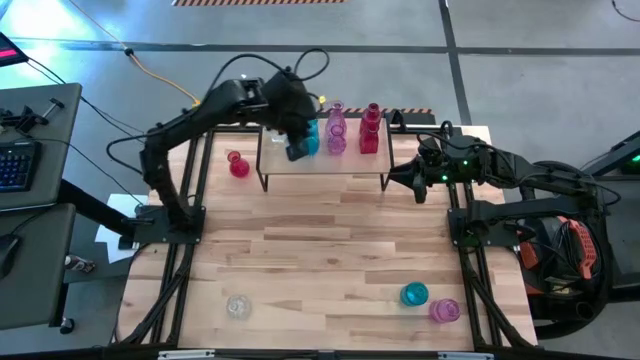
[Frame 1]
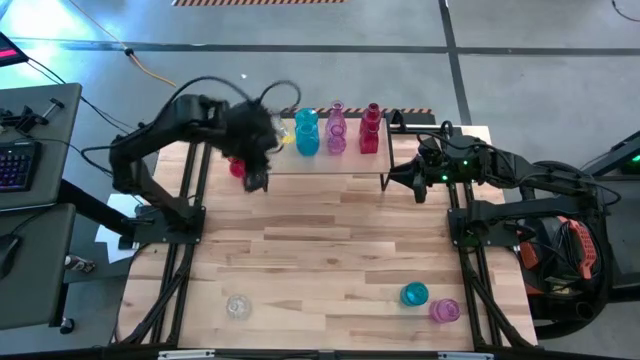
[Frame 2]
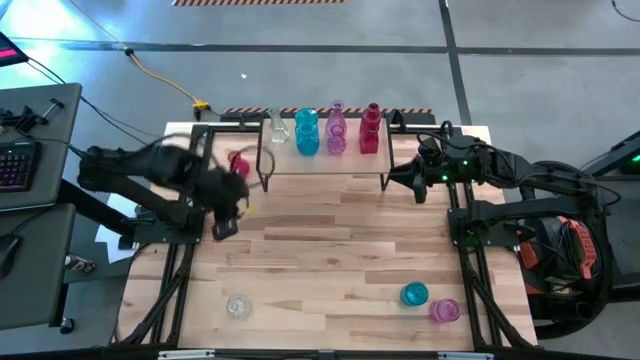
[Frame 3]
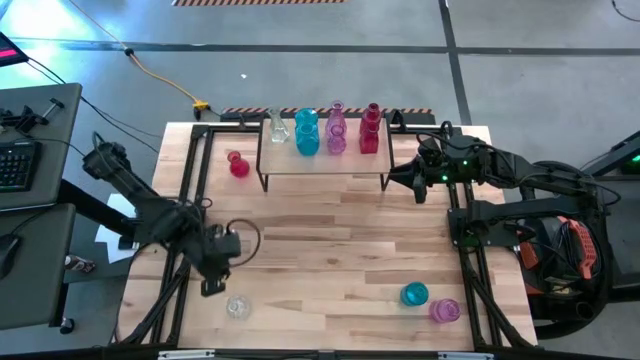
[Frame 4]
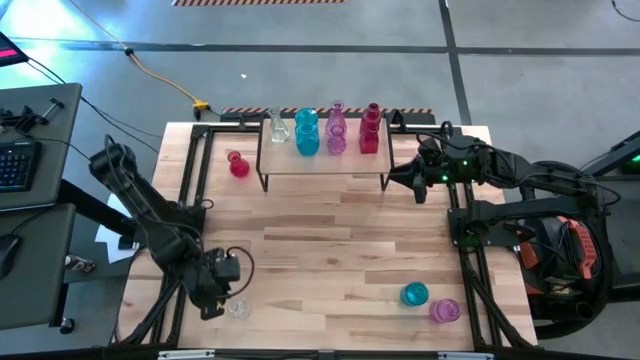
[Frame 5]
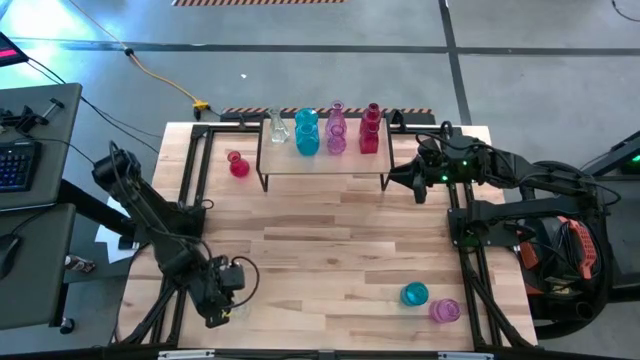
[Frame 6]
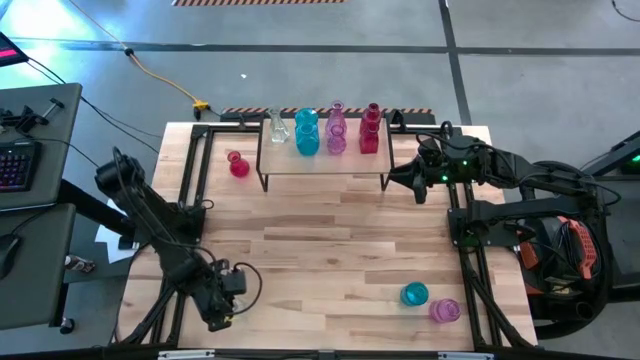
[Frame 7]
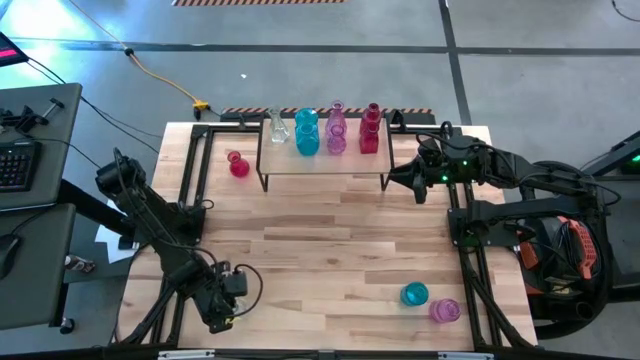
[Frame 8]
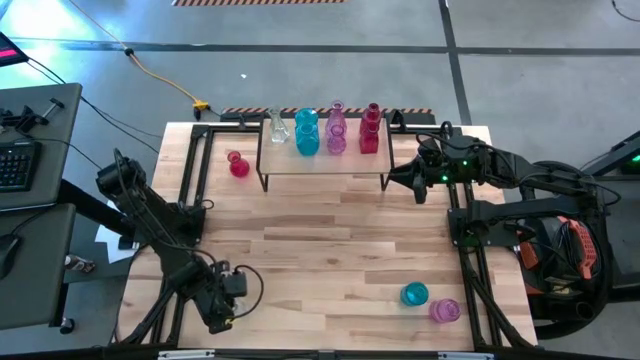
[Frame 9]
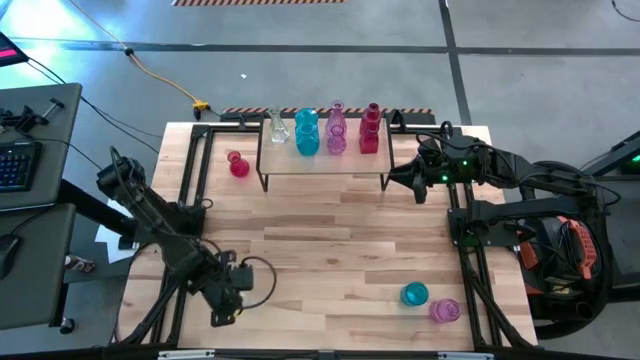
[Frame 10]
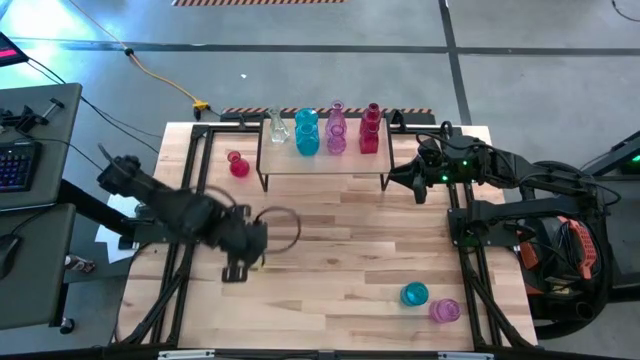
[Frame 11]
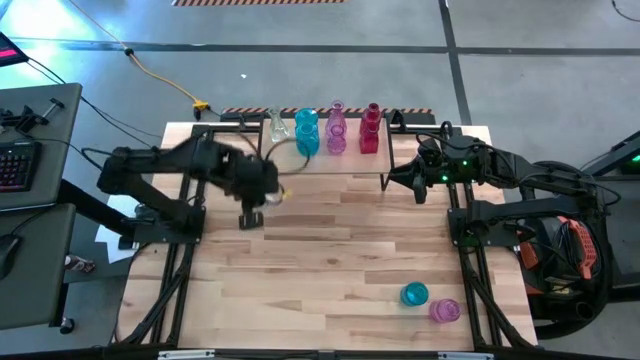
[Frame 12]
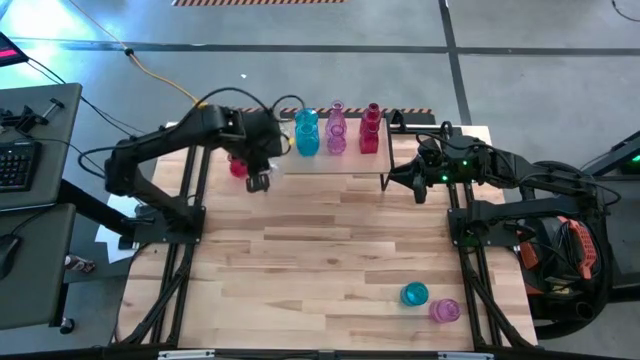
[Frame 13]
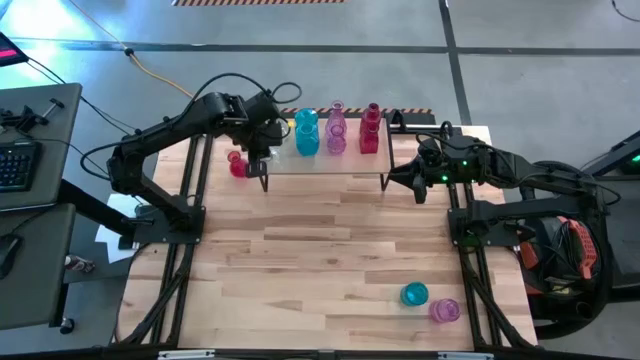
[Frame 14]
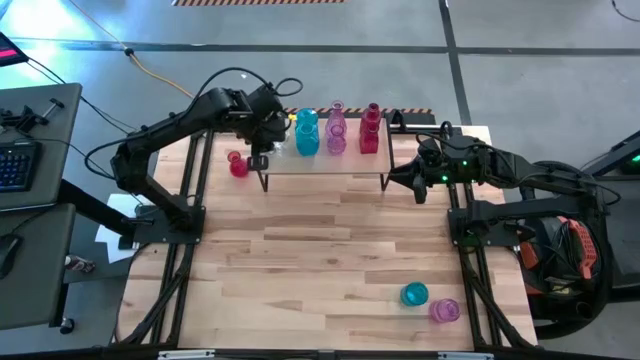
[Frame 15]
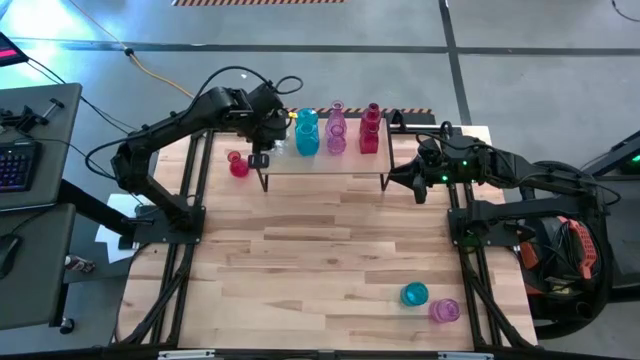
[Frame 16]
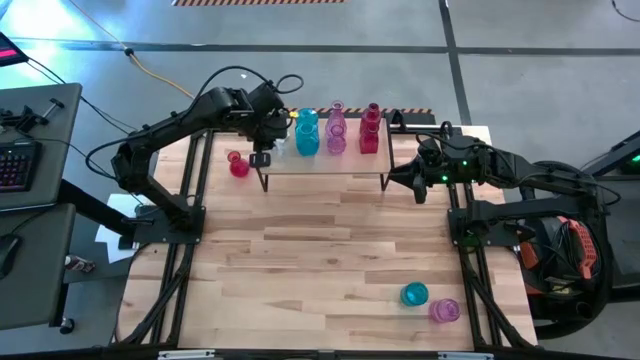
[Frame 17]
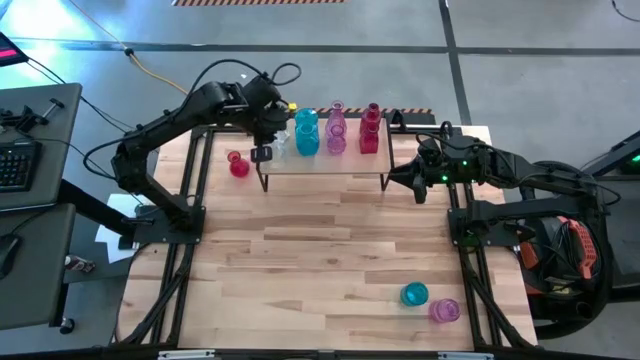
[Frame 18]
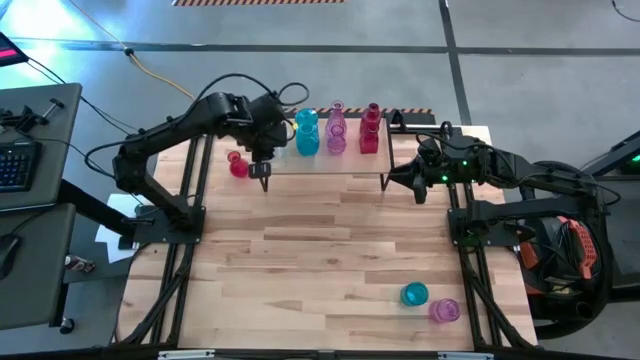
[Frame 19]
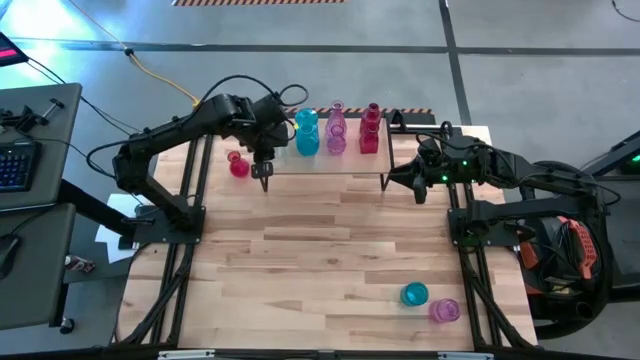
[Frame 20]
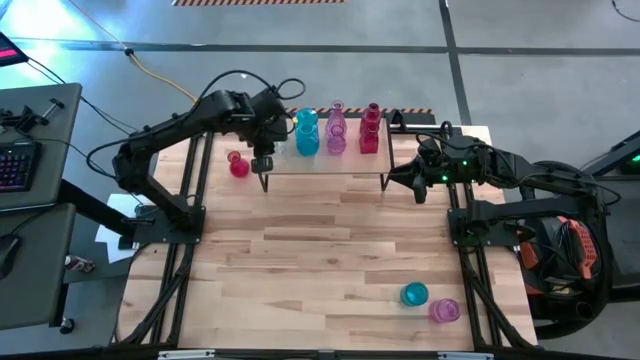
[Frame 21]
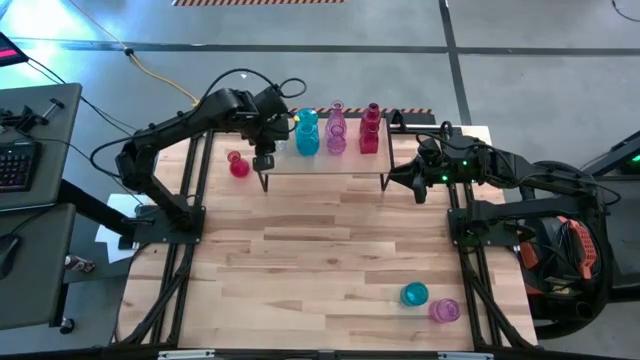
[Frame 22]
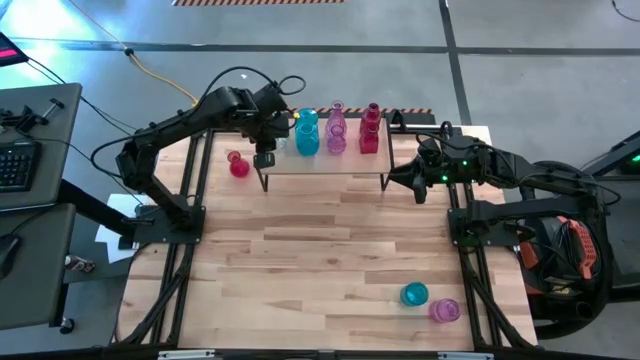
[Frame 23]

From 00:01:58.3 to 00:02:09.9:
Task: sort vases onto shelf
Put the bottom transparent flower vase on the shelf aligned with the other transparent flower vase

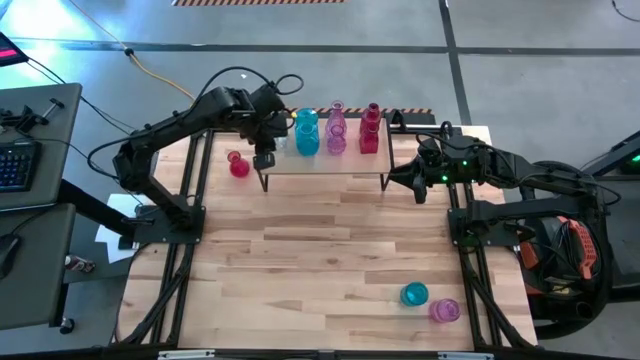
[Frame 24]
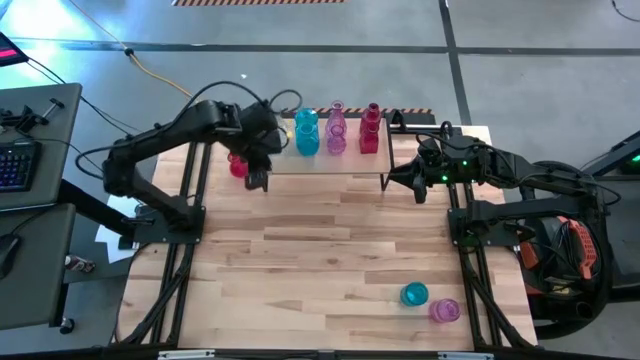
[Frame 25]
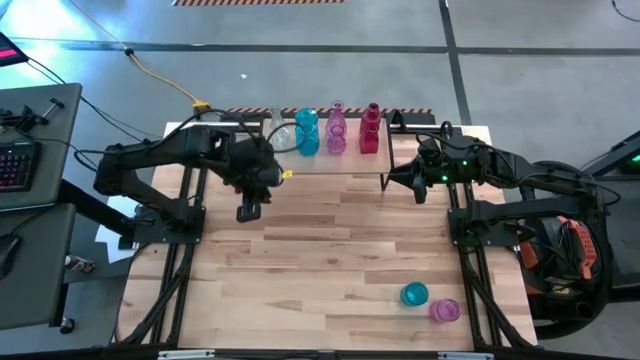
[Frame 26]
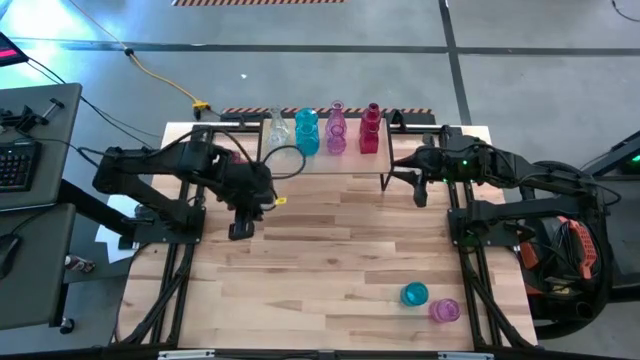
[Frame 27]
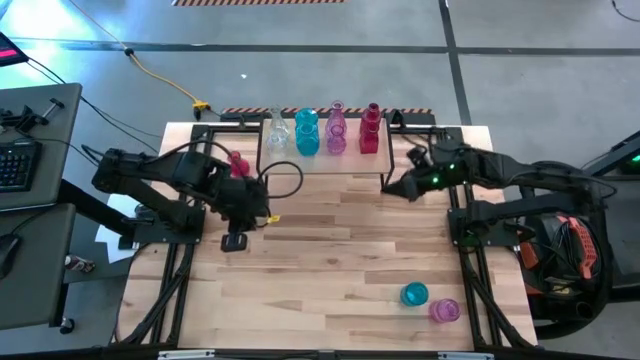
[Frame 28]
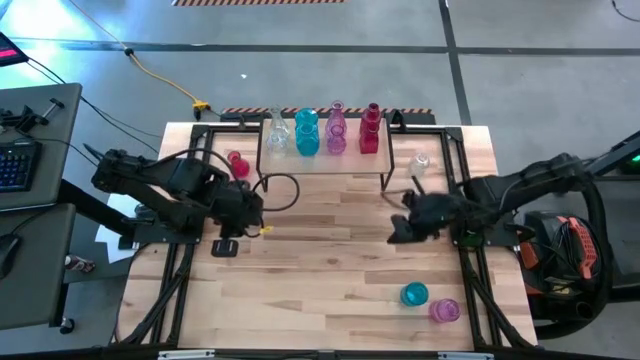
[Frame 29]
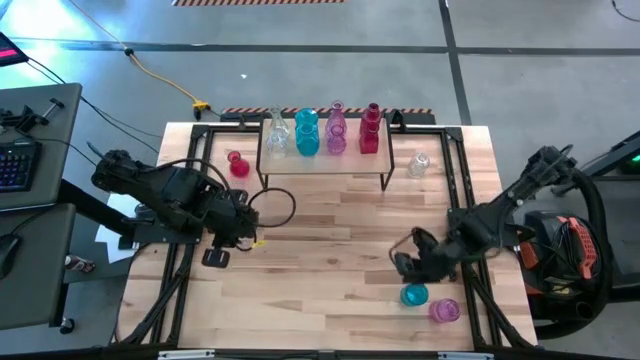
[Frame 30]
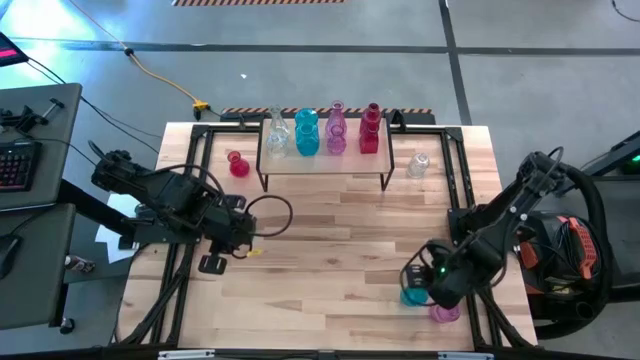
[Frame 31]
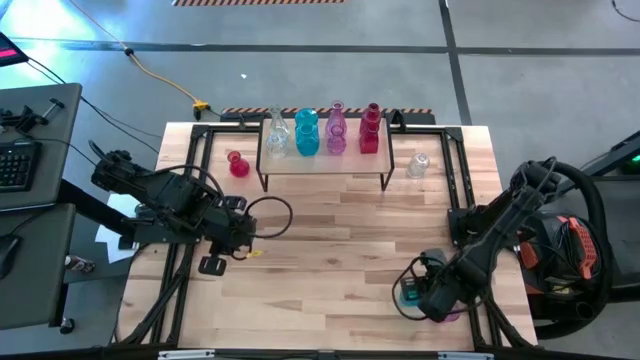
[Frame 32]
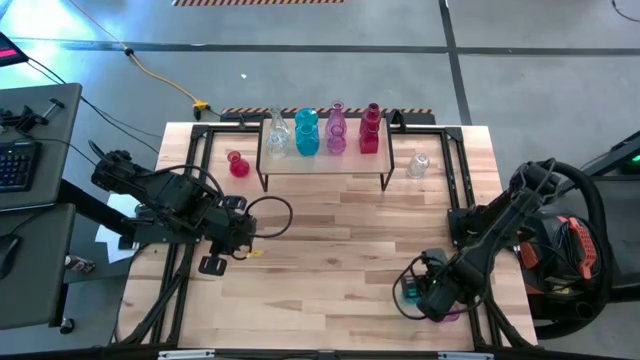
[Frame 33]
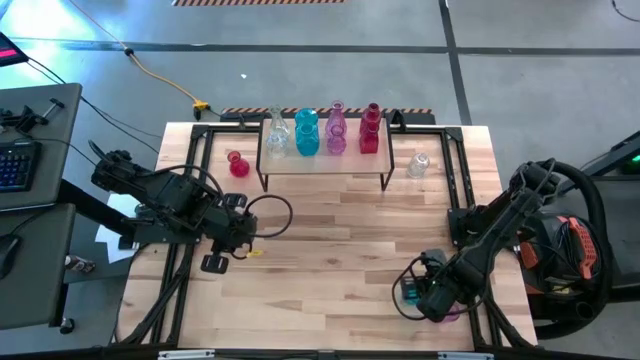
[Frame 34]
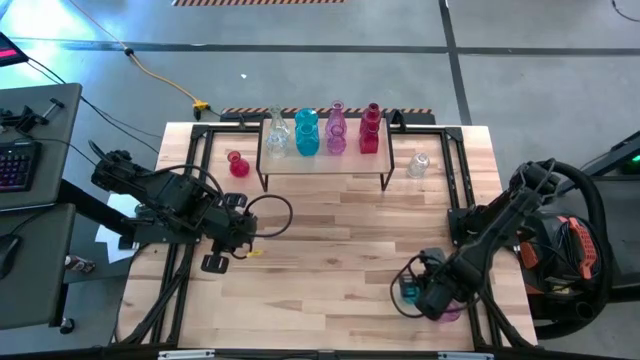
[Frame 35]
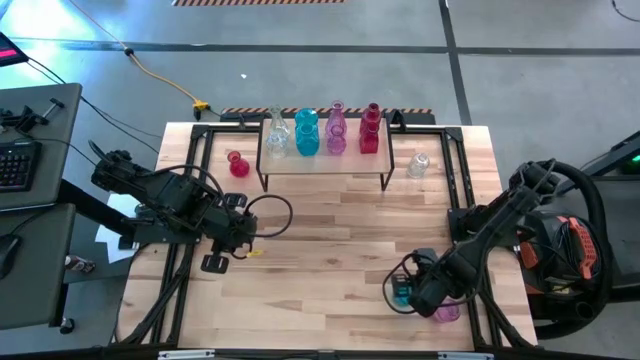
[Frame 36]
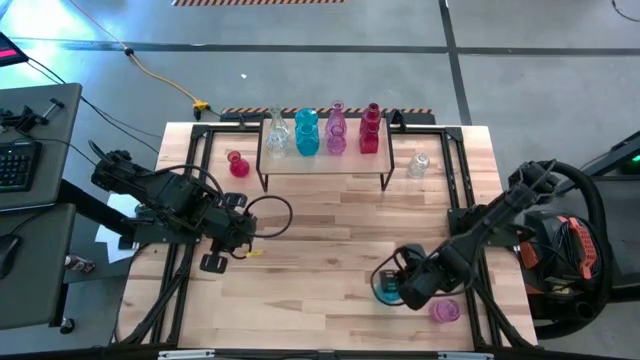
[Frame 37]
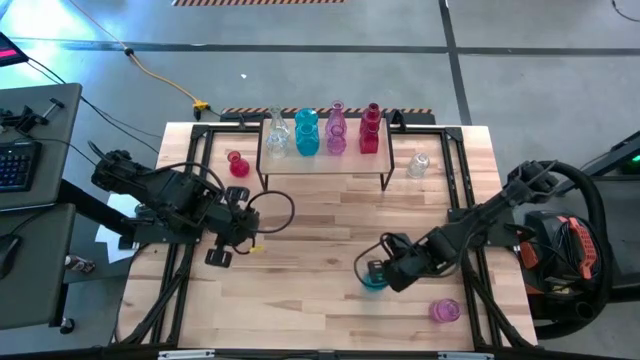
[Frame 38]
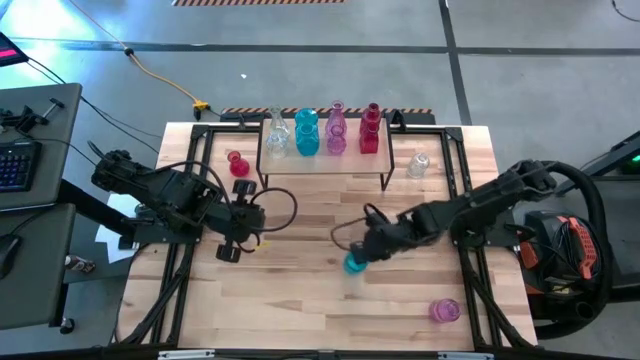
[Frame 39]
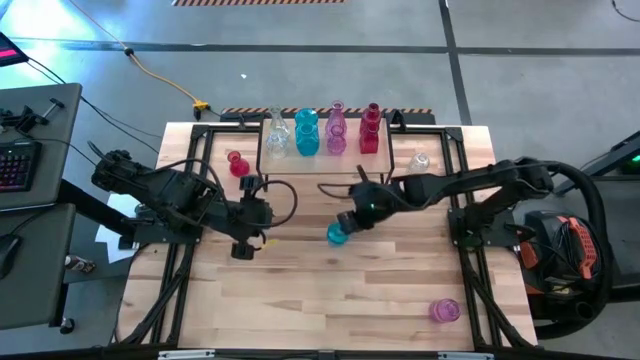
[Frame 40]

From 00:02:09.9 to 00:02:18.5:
Put the blue flower vase on the shelf aligned with the other blue flower vases
